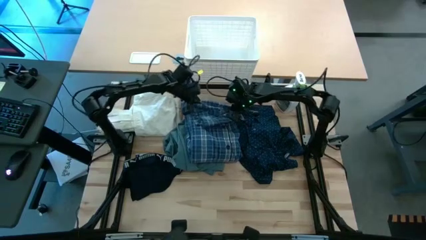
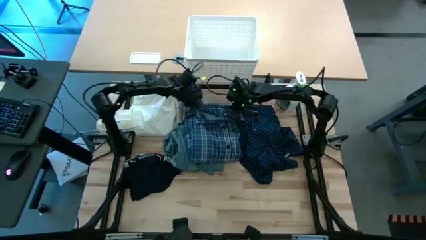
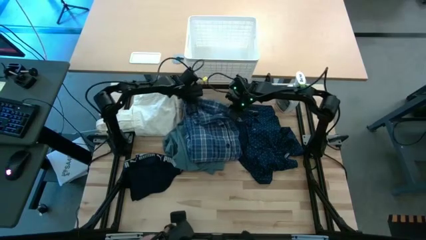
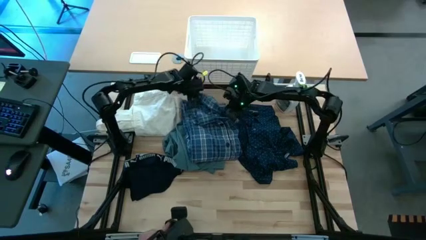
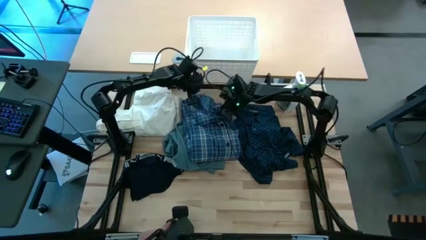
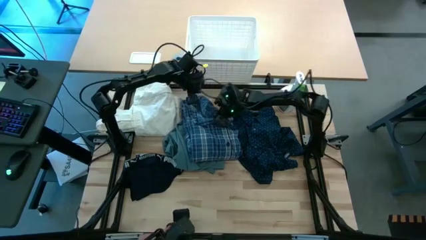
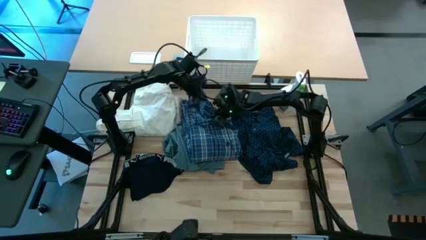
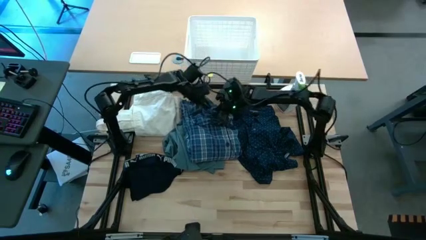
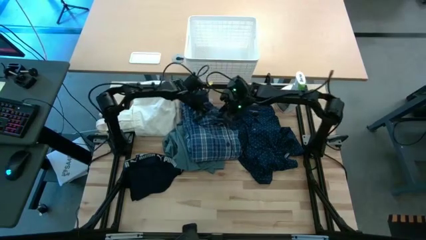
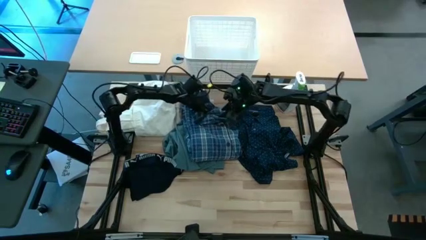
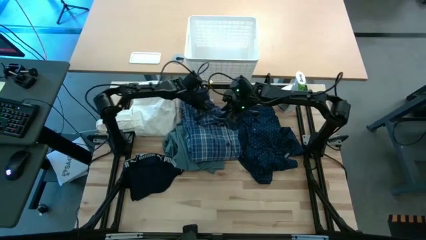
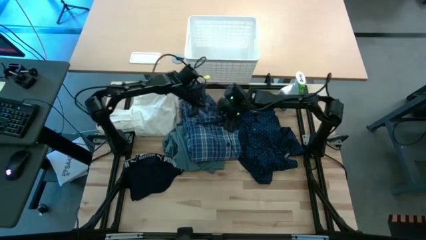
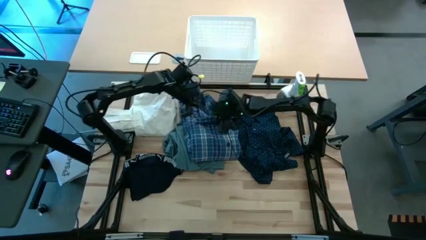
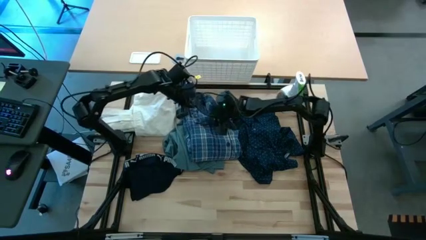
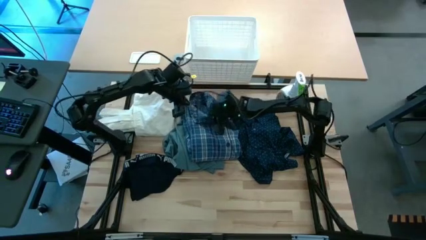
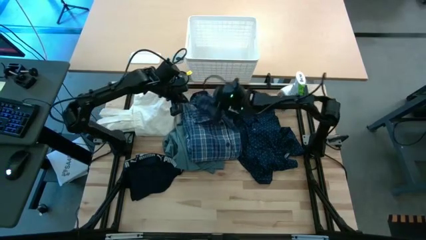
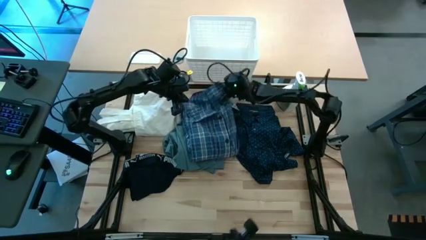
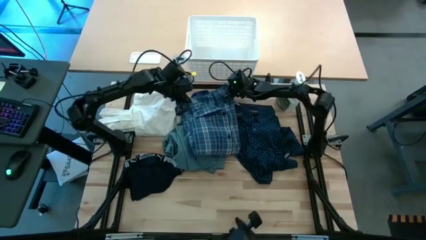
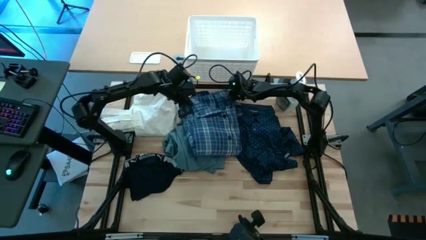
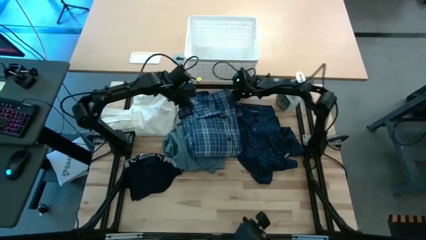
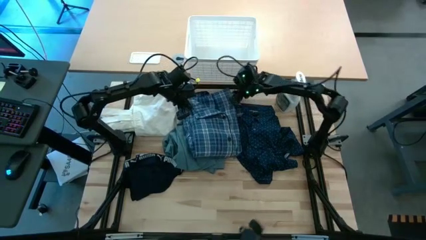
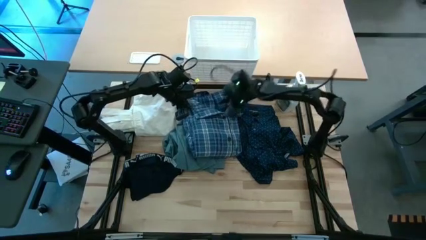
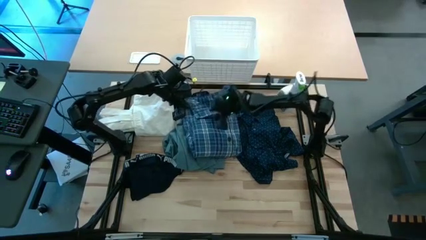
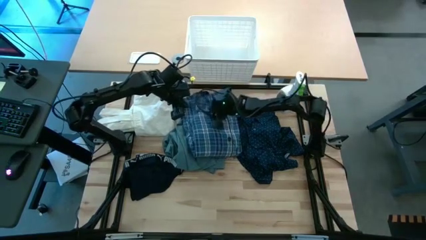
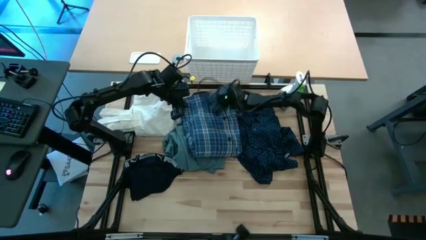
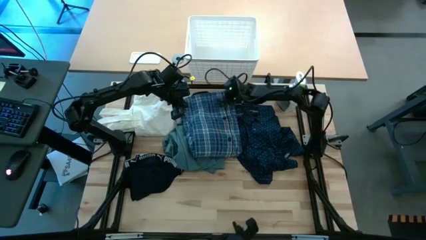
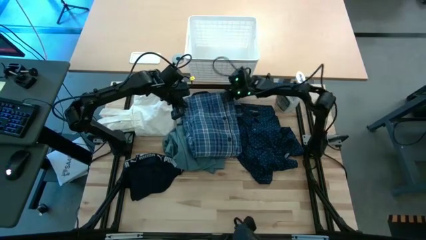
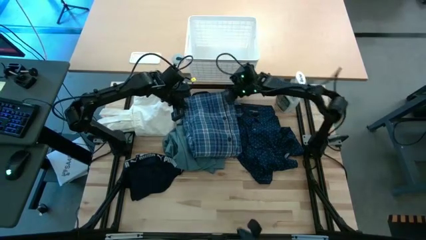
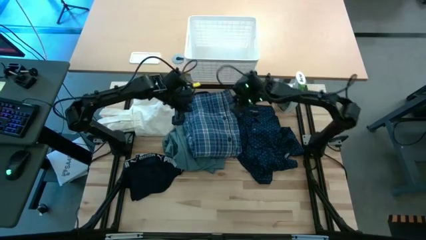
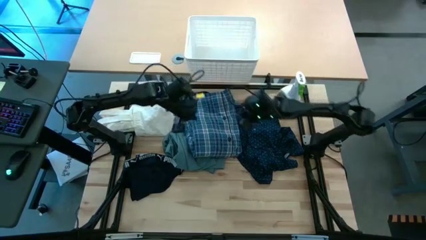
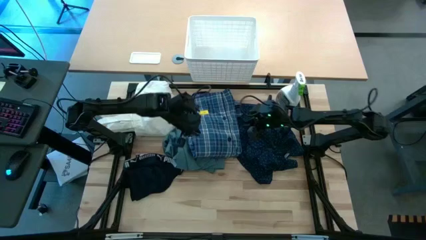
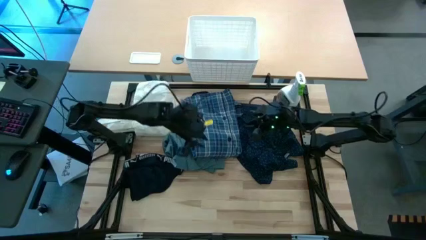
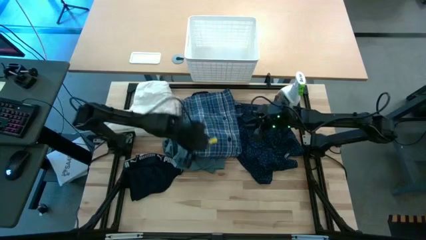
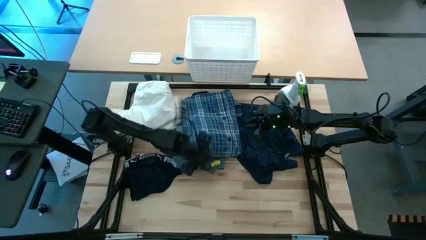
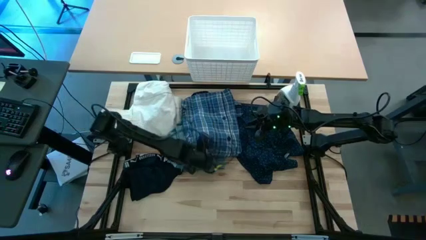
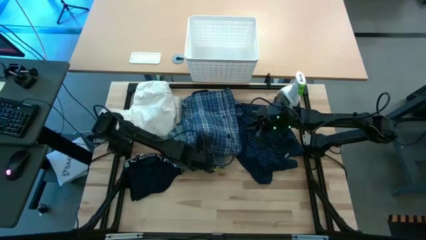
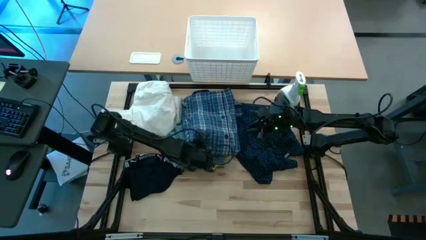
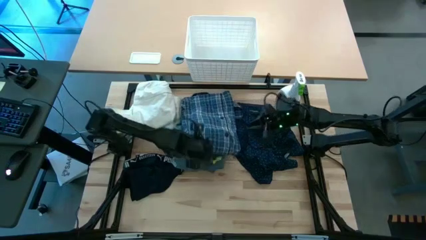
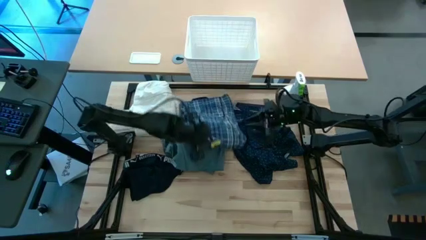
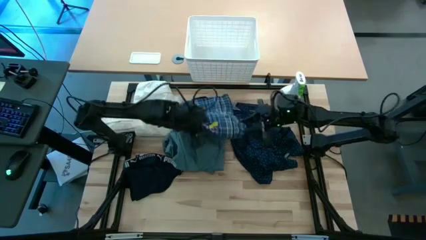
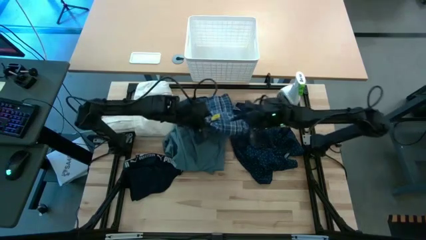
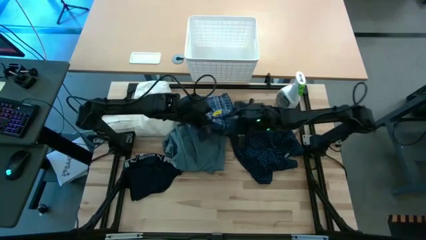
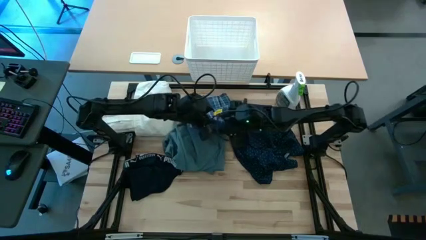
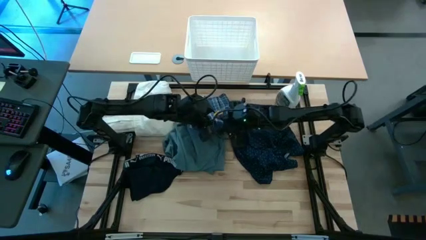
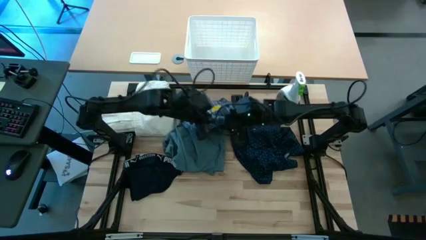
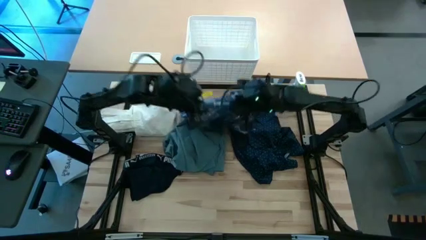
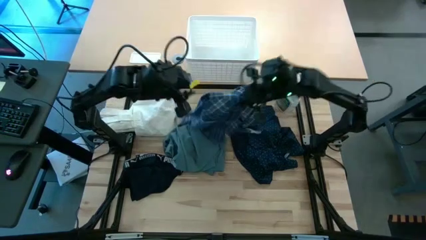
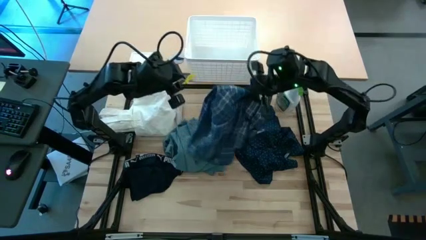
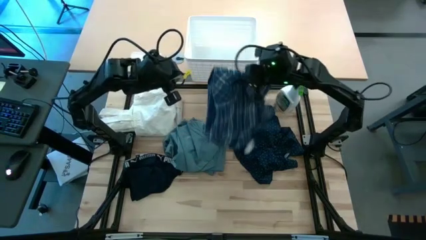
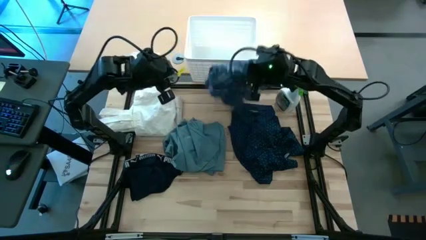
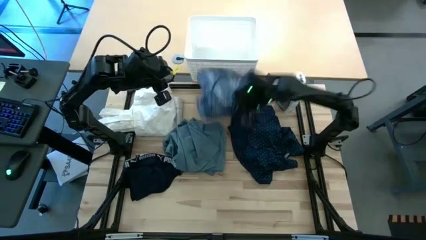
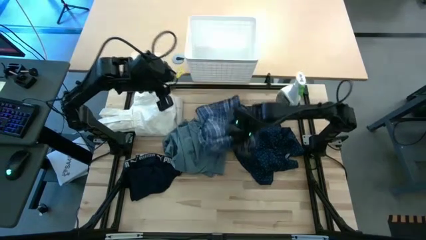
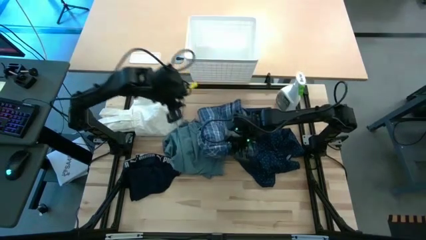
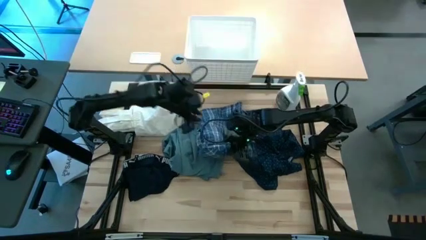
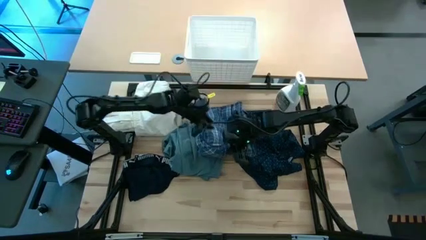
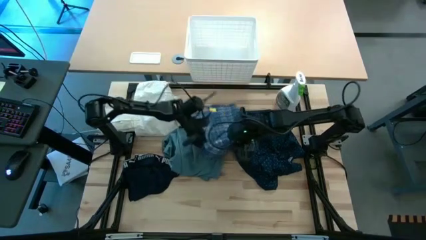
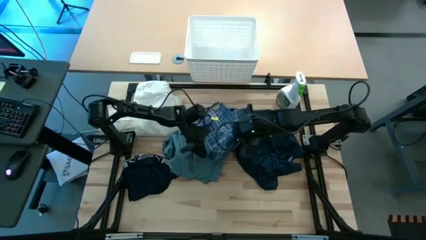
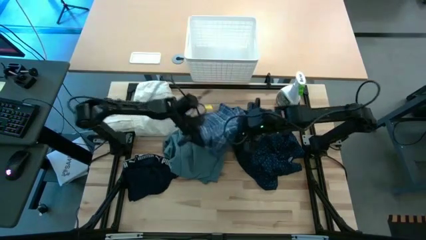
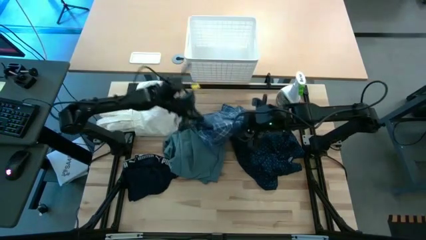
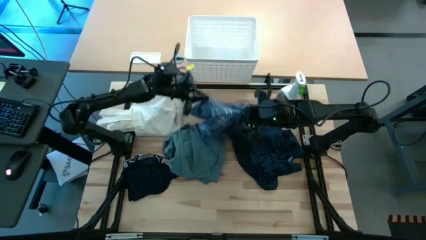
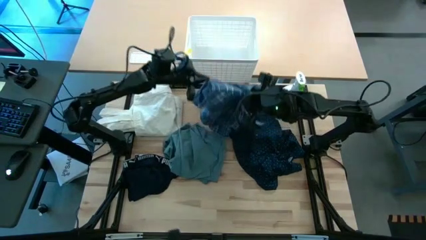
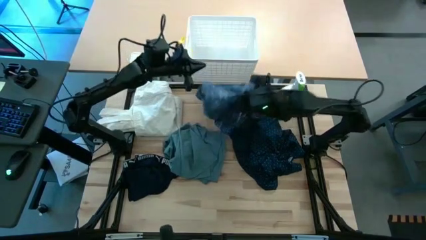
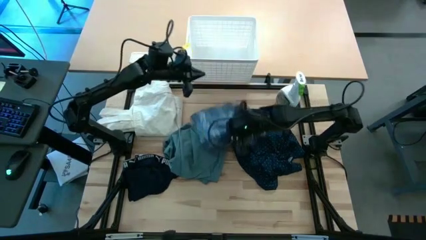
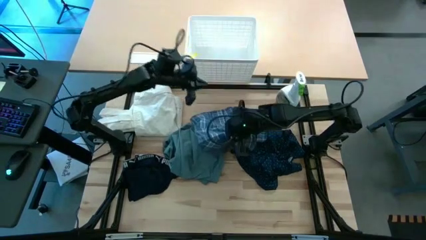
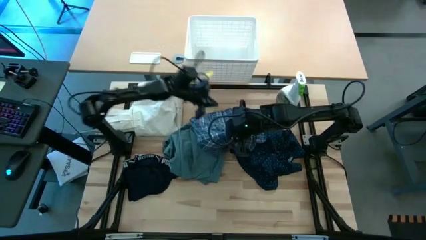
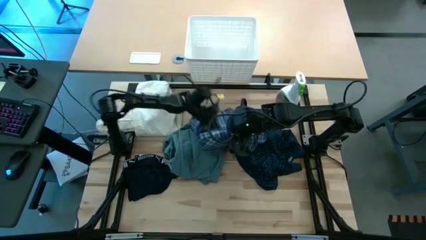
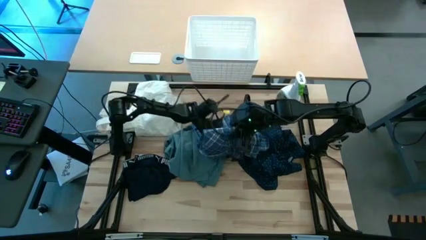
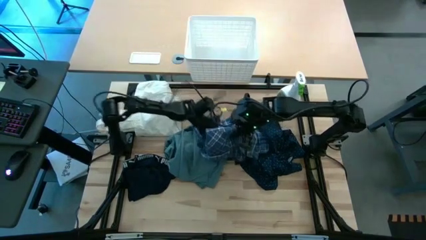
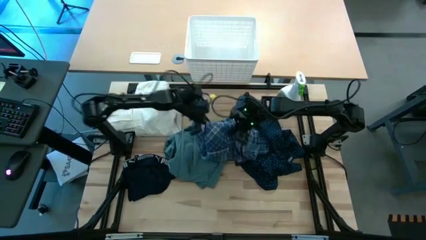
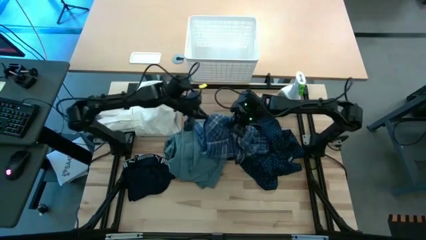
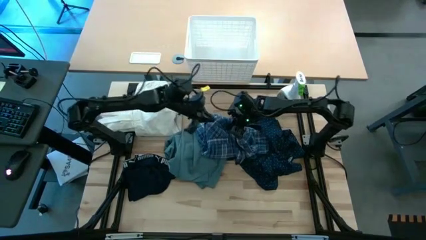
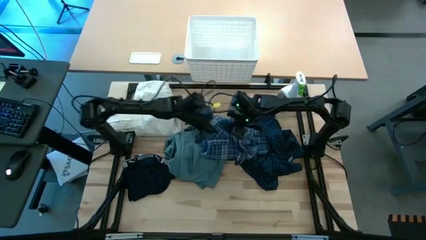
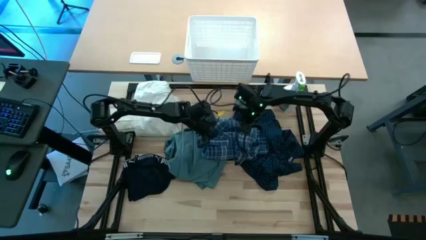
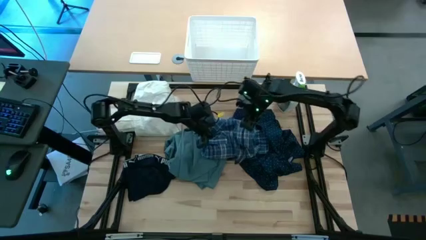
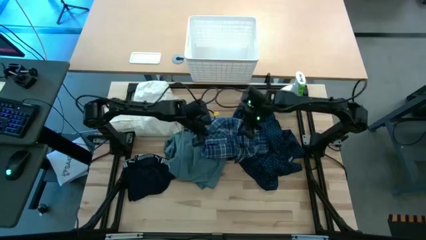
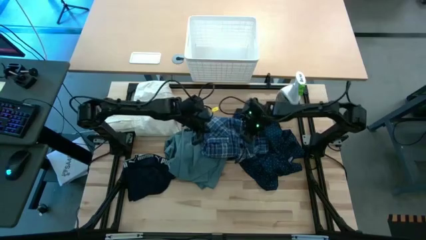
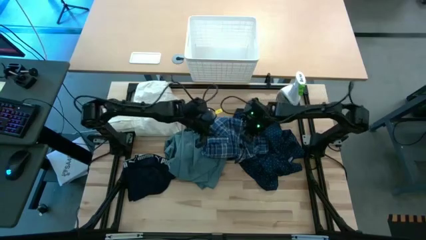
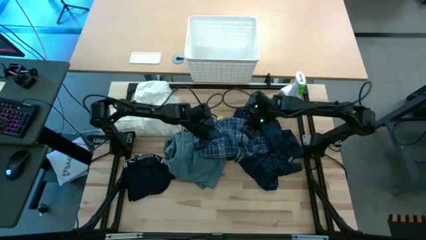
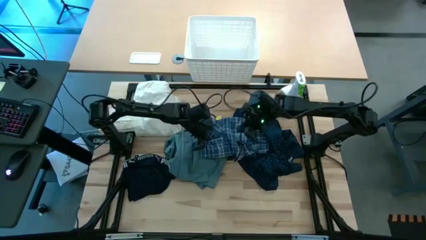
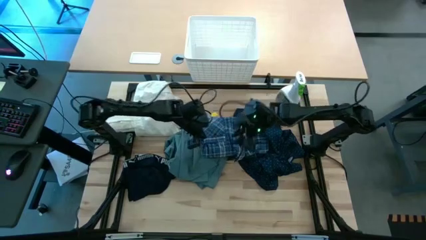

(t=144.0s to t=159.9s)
Fold the checkered blue polo

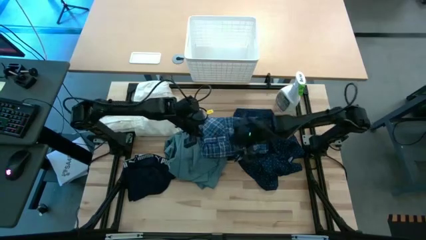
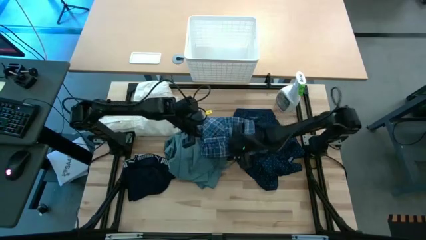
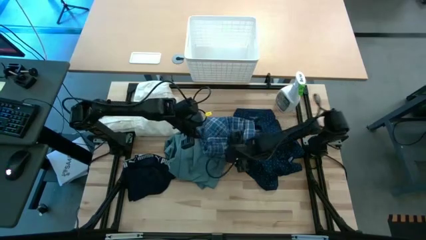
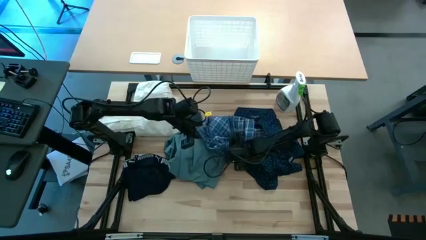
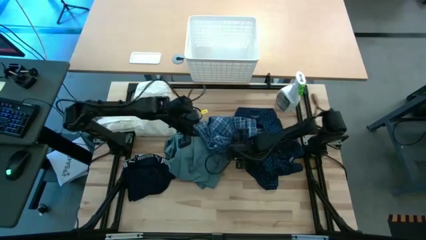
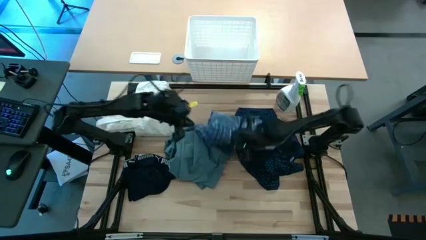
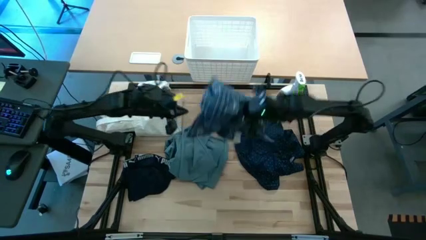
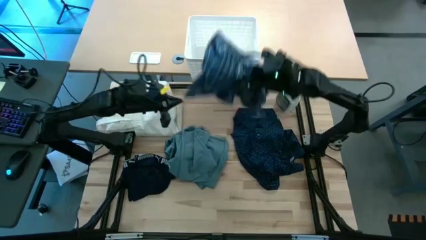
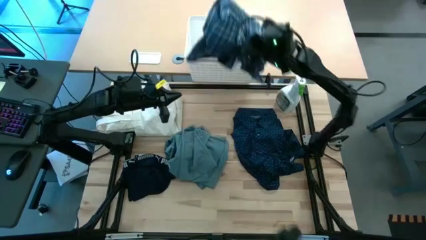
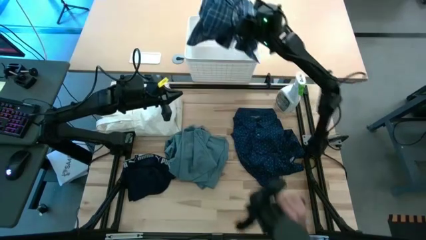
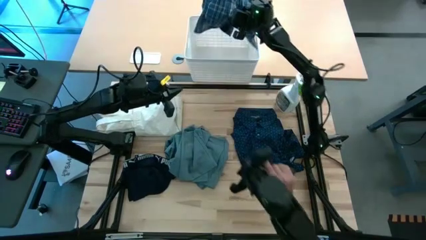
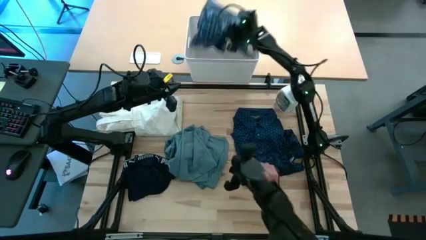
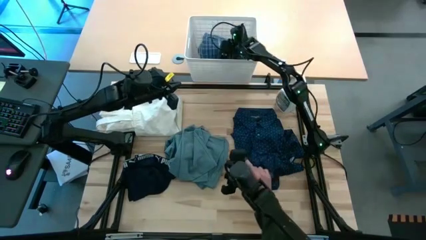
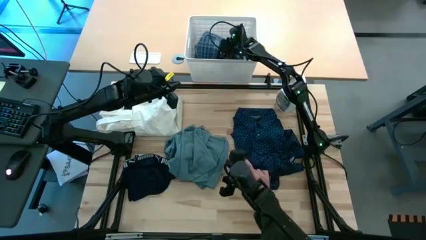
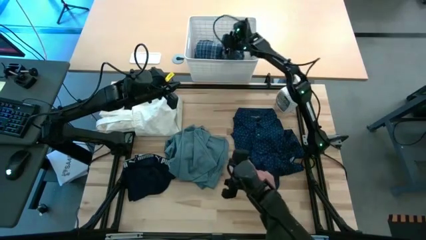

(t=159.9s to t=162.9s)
Put the folded checkered blue polo into the white bin
